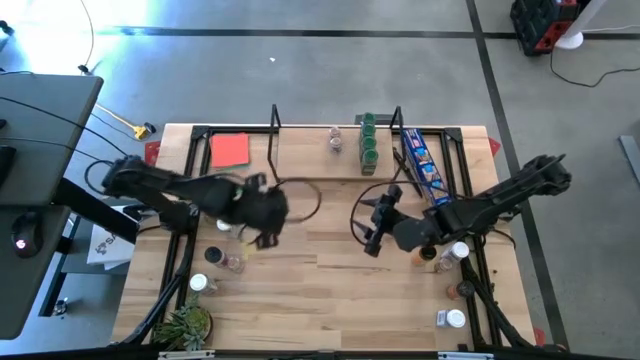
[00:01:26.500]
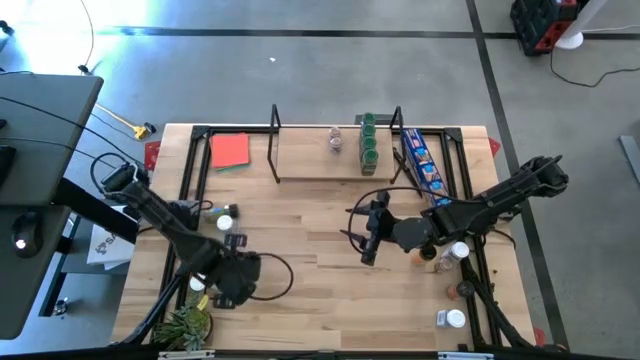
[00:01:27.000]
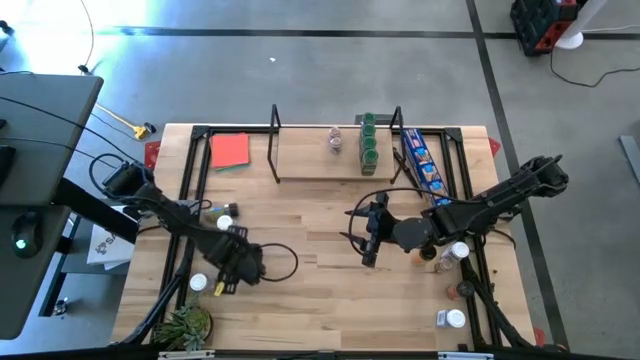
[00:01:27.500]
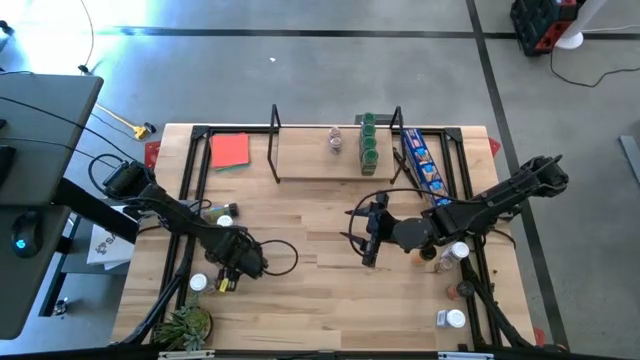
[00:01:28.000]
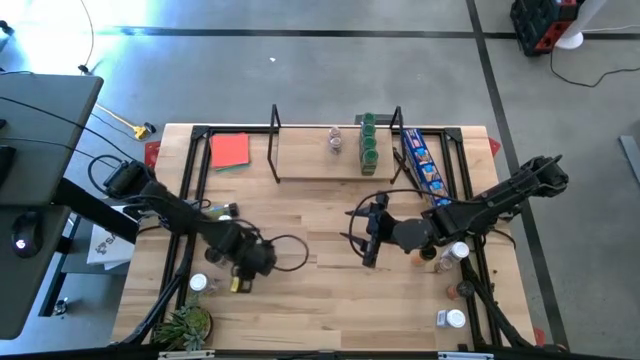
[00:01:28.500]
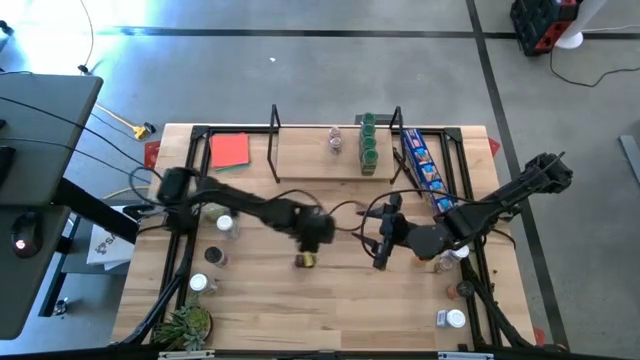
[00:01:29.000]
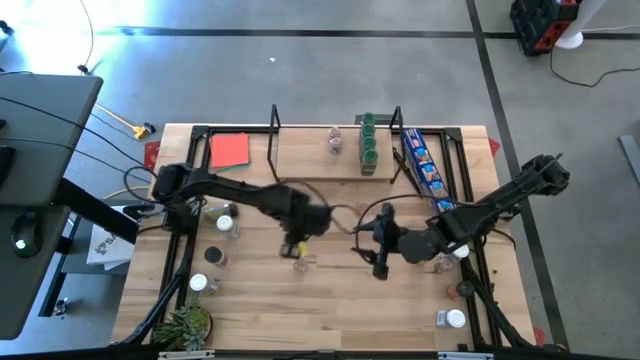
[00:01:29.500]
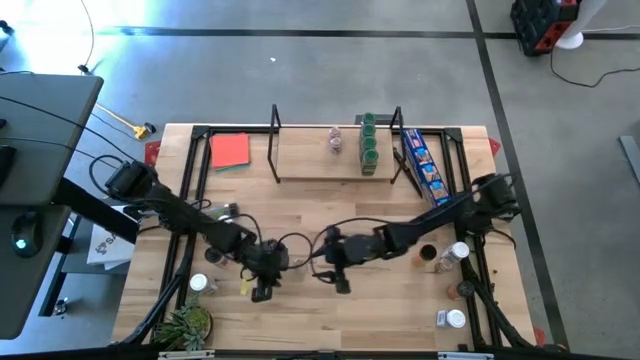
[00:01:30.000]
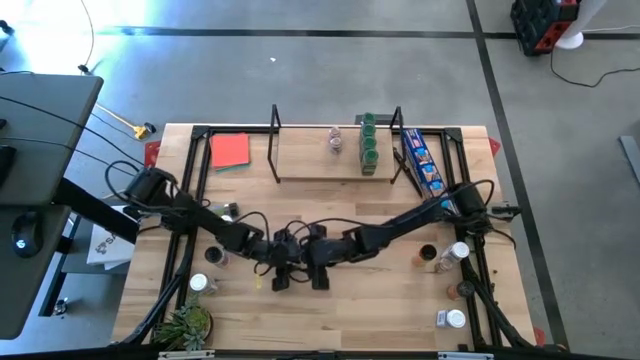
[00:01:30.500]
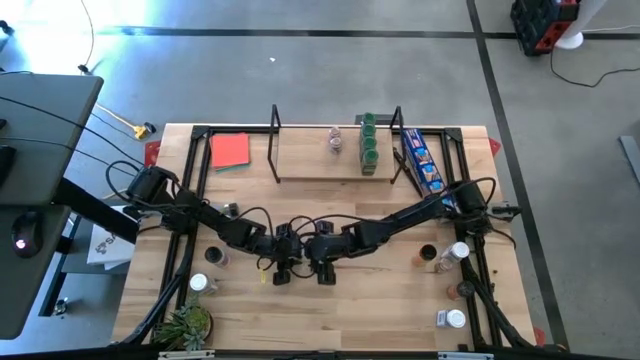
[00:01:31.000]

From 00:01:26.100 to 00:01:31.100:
Task: Shelf spices
Put the transparent seasoning bottle on the shelf aligned with the other transparent seasoning bottle

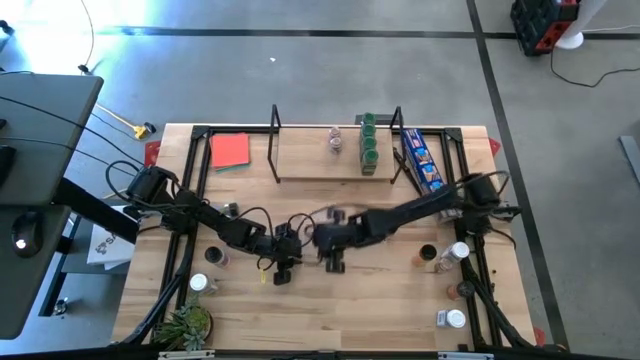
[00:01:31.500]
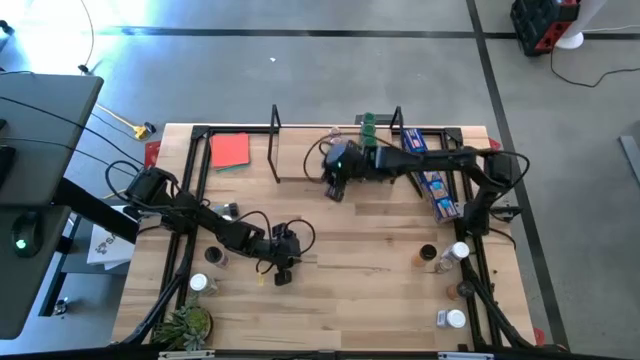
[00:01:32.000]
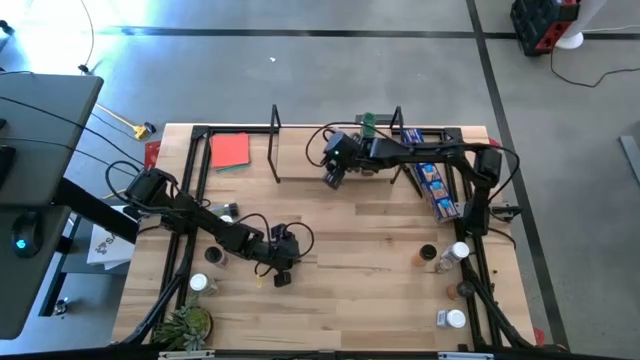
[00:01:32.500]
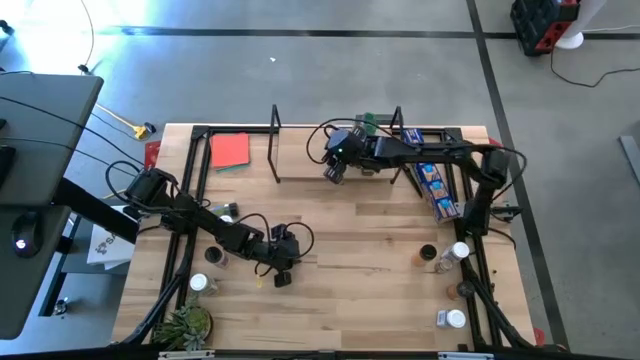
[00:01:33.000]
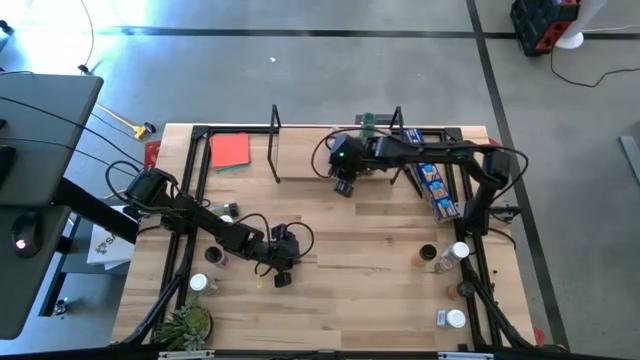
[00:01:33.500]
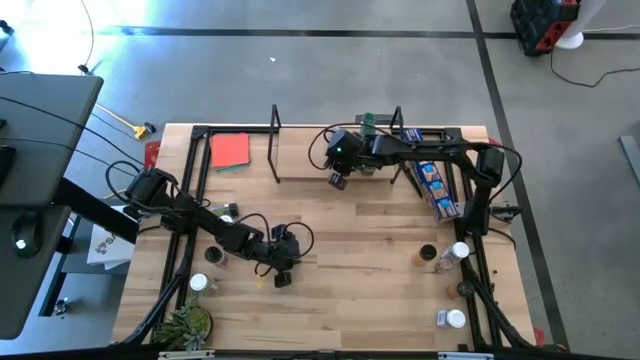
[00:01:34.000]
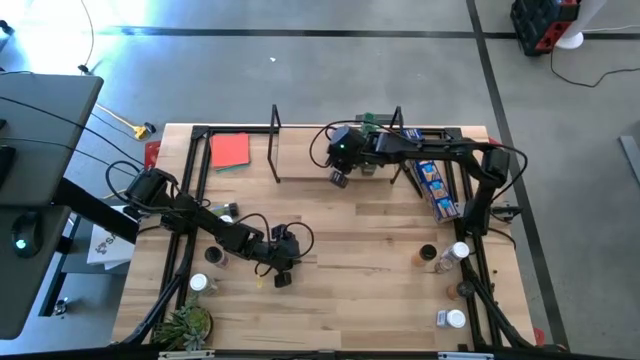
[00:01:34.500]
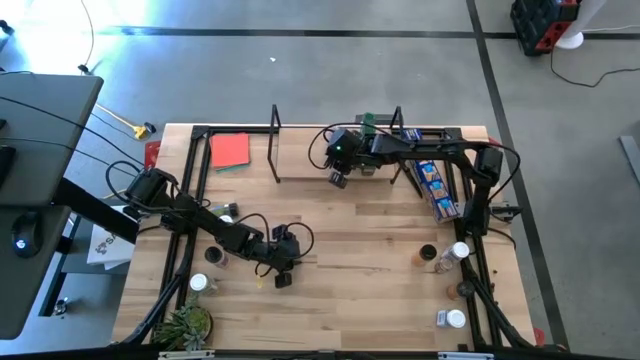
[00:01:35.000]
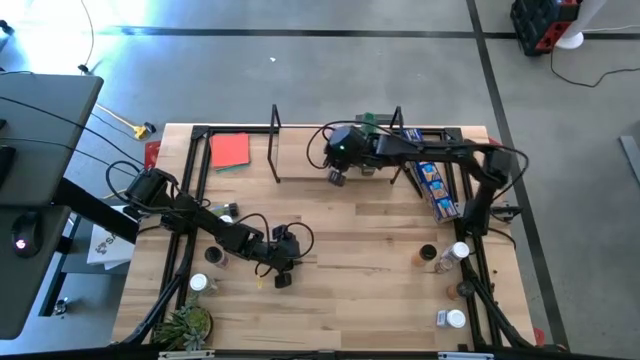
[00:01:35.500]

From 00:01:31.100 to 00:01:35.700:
Put the transparent seasoning bottle on the shelf aligned with the other transparent seasoning bottle

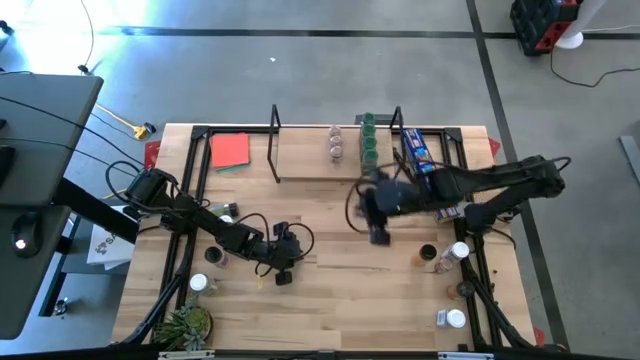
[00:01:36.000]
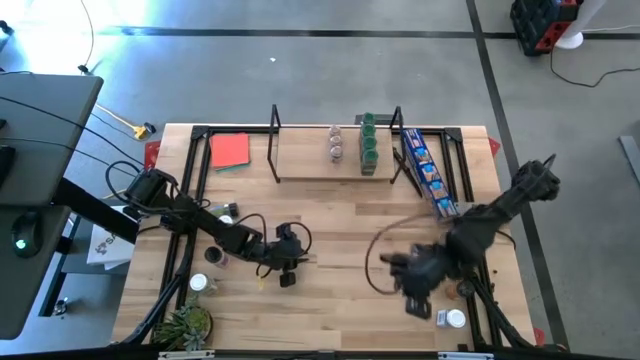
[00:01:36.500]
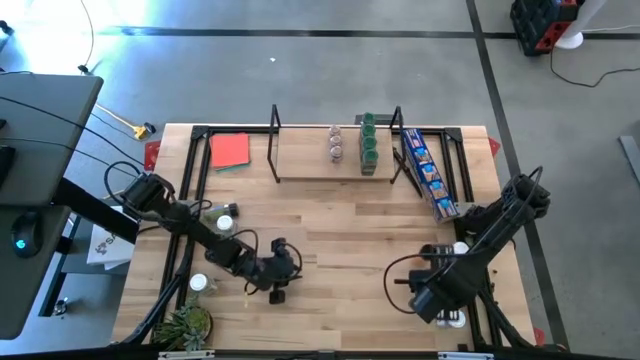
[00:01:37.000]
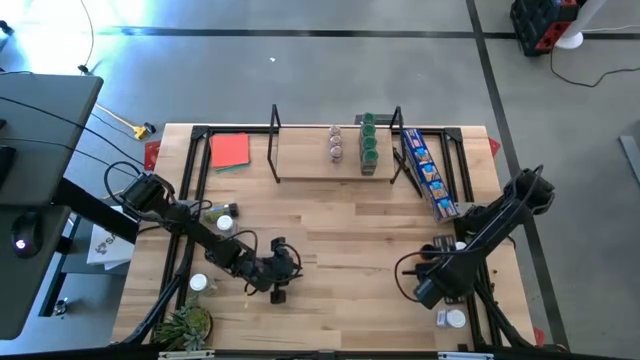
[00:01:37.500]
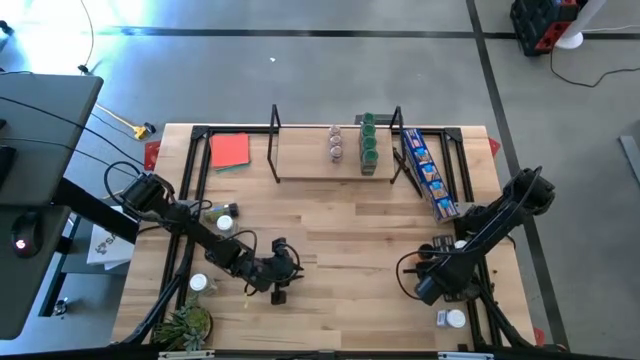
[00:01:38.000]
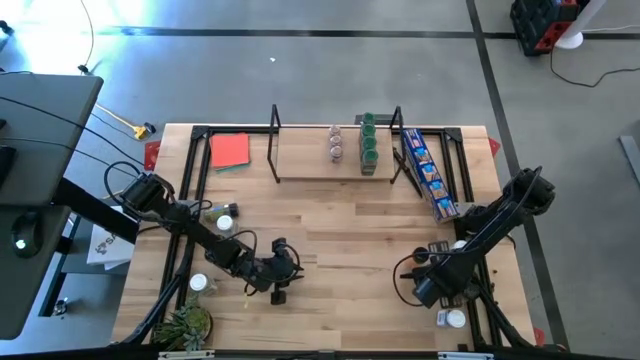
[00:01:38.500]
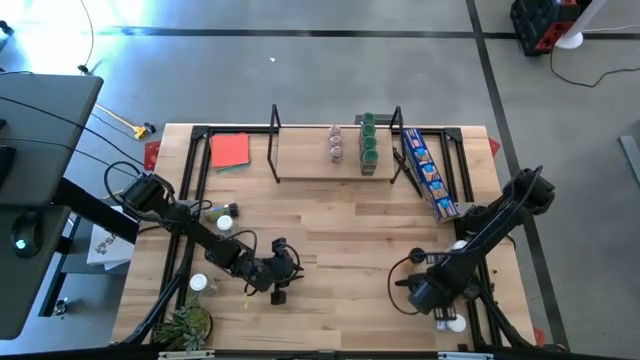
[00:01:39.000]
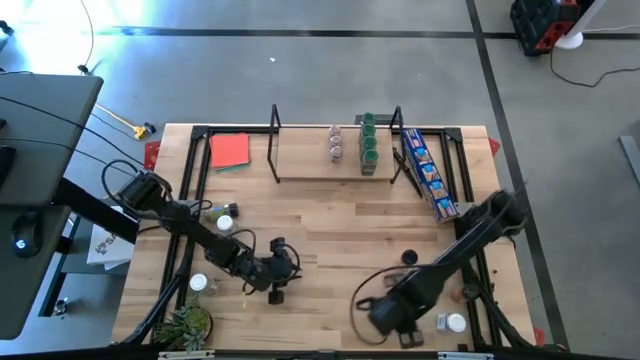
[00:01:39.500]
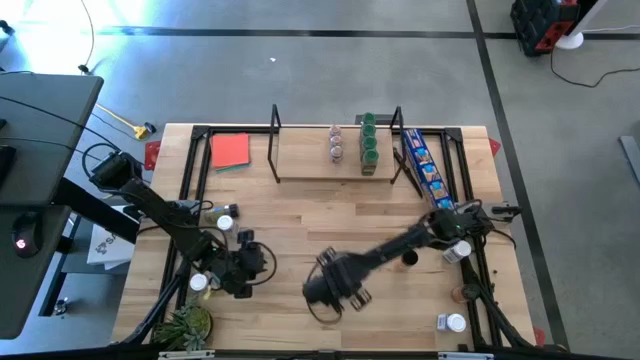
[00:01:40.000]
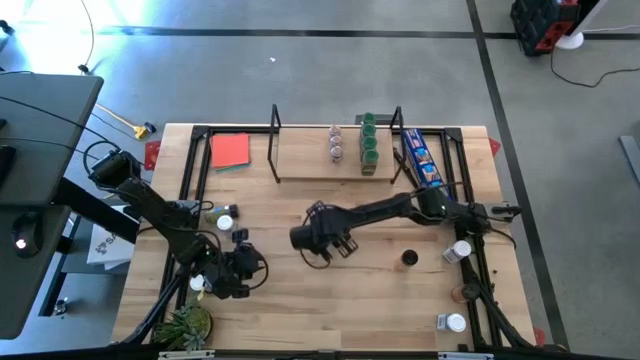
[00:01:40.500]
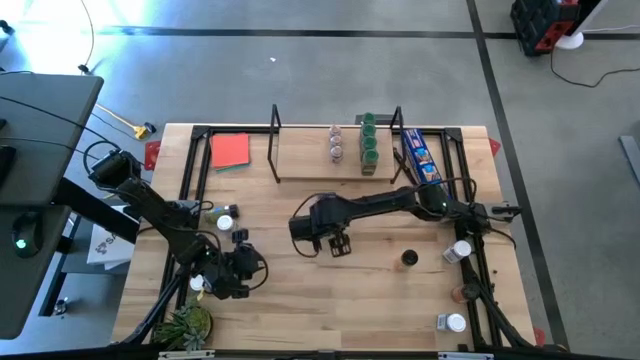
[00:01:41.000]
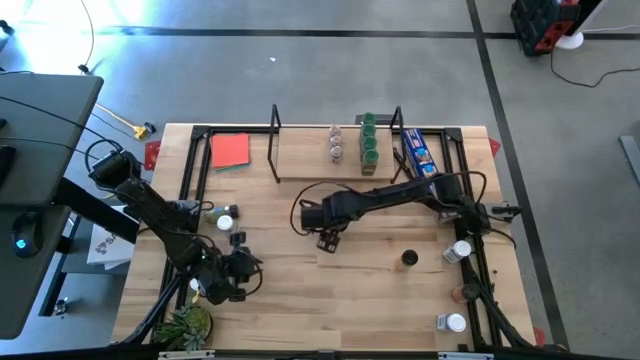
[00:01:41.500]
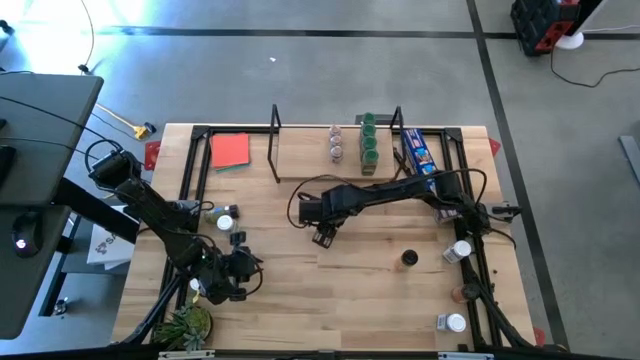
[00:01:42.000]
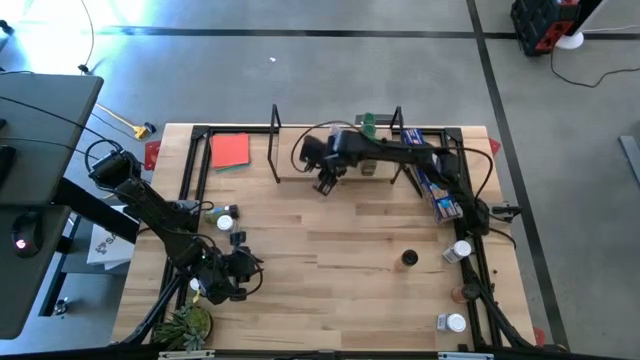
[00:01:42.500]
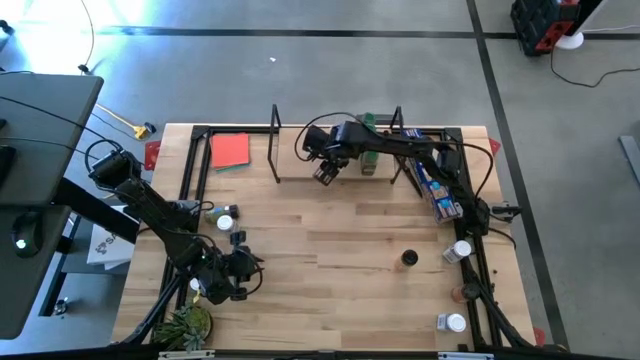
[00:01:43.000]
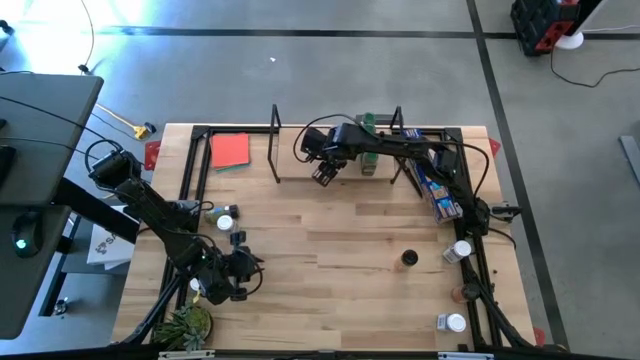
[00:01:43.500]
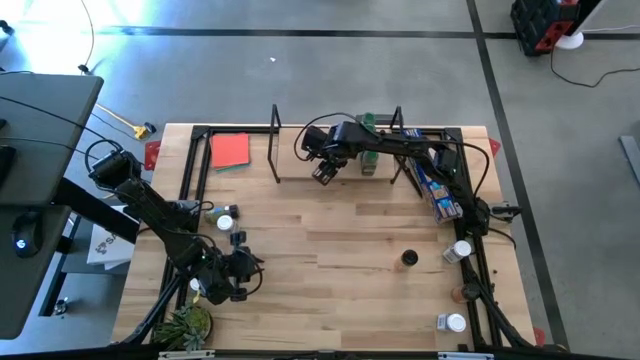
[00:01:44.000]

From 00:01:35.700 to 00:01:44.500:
Put the transparent seasoning bottle on the shelf aligned with the other transparent seasoning bottle

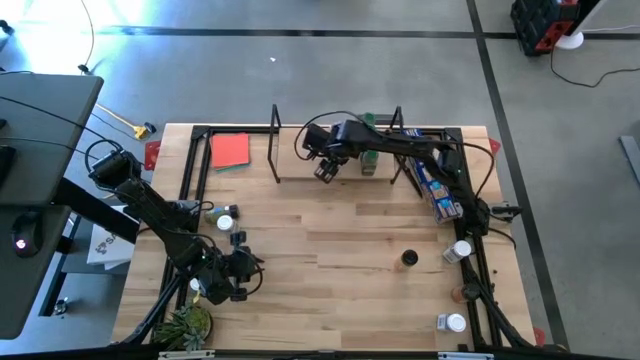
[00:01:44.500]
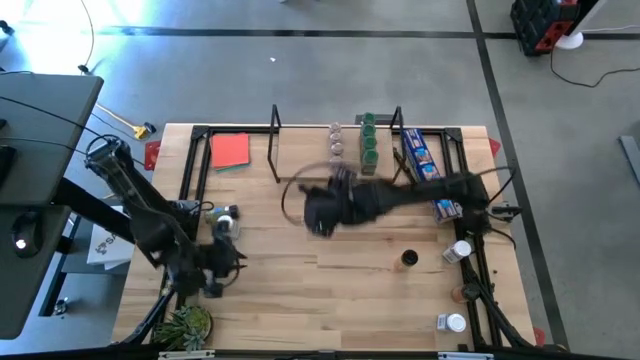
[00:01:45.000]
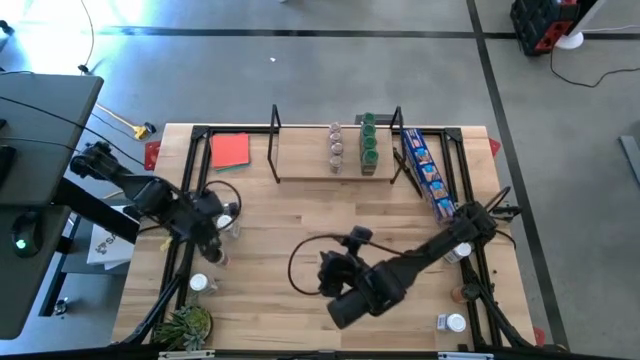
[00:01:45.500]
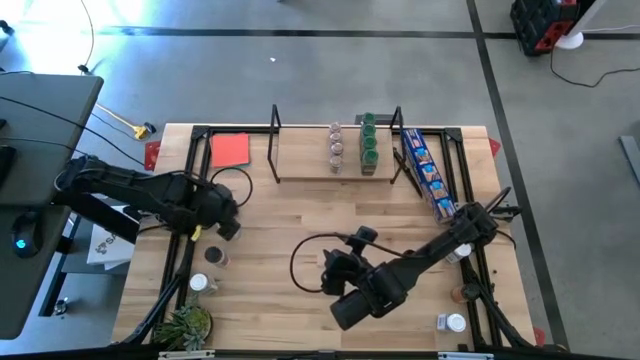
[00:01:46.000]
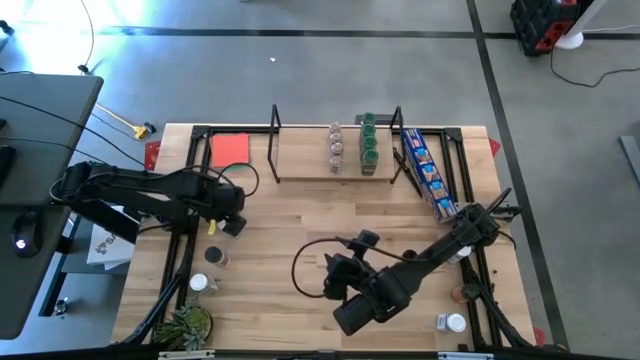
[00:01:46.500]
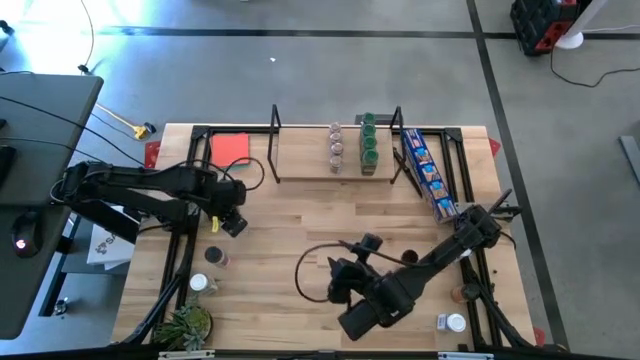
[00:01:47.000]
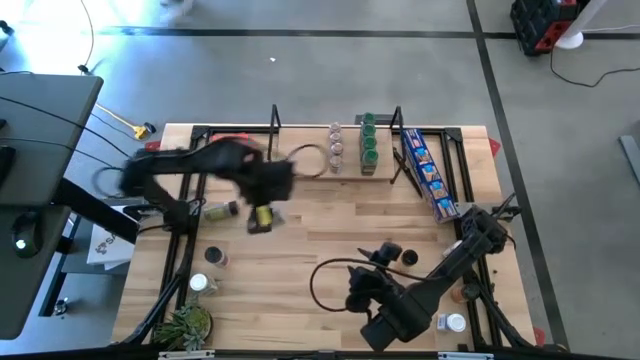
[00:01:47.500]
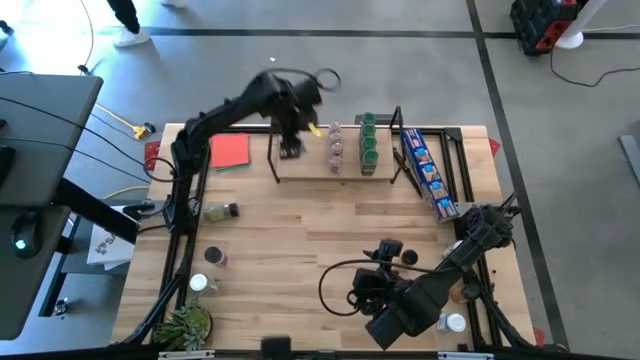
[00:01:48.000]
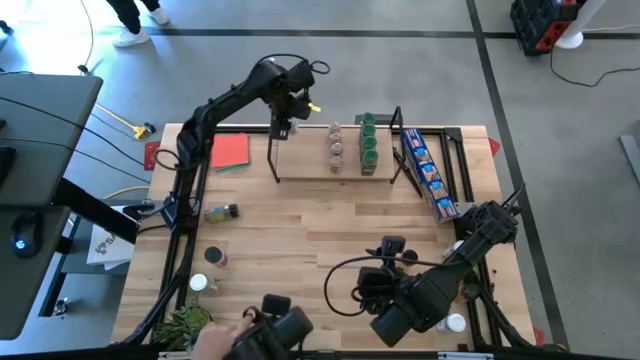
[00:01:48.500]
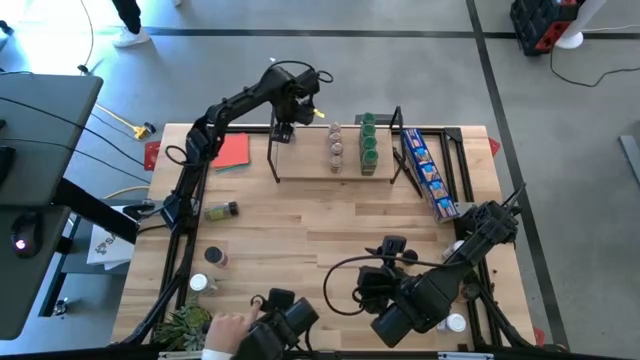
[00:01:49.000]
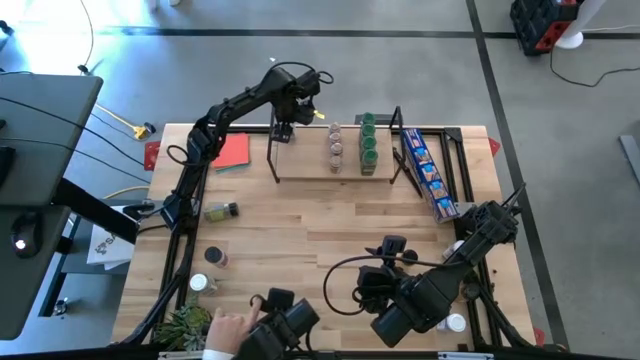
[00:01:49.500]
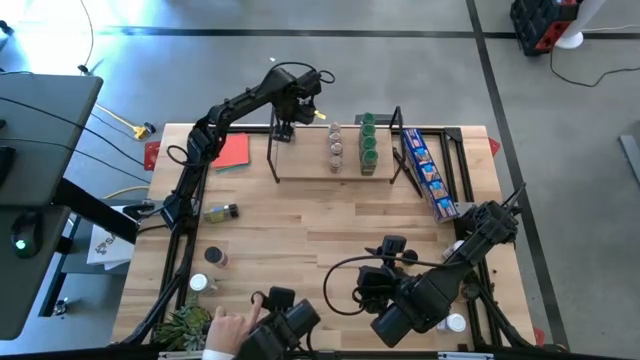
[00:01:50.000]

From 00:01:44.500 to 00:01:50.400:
Put the white seasoning bottle on the shelf
